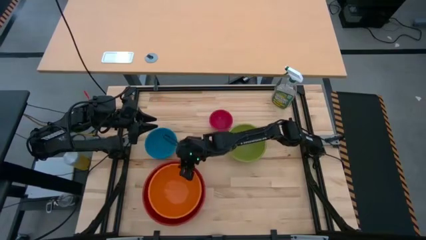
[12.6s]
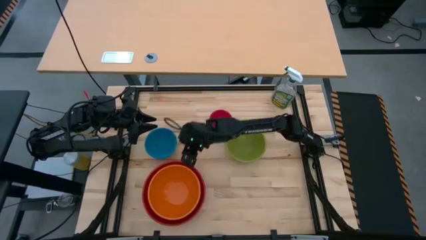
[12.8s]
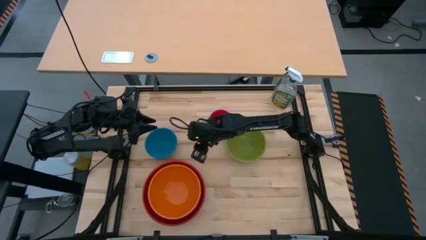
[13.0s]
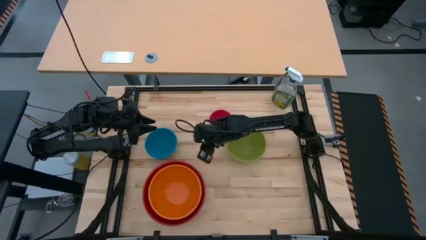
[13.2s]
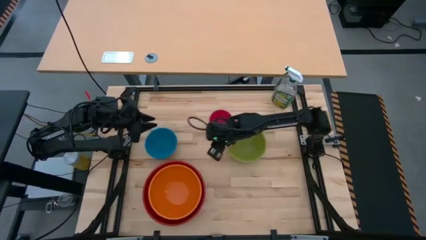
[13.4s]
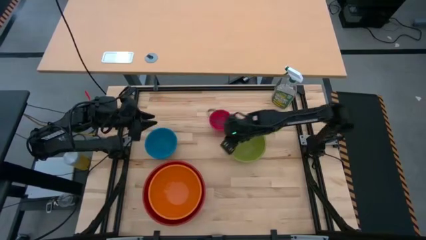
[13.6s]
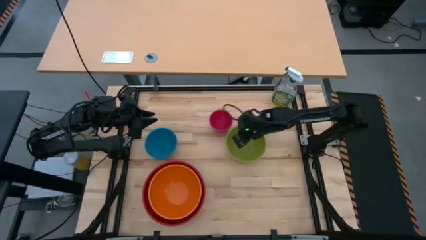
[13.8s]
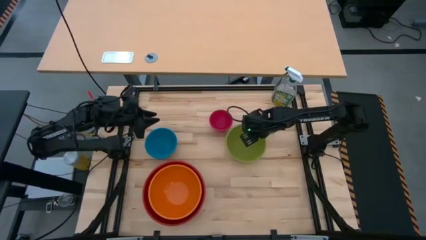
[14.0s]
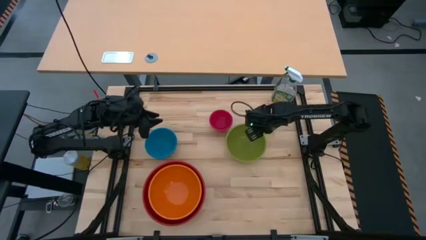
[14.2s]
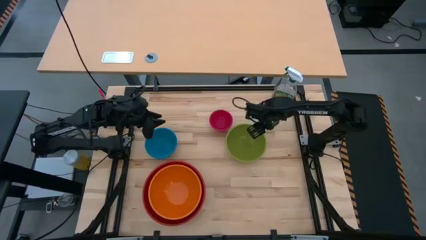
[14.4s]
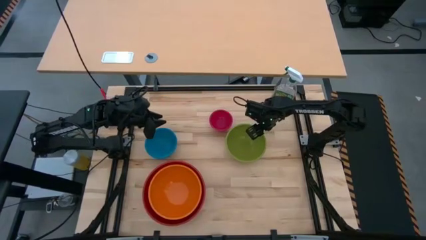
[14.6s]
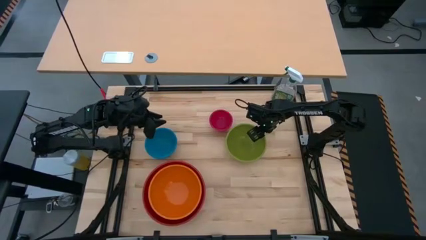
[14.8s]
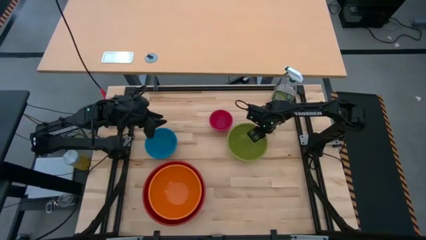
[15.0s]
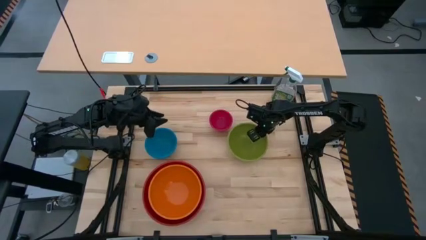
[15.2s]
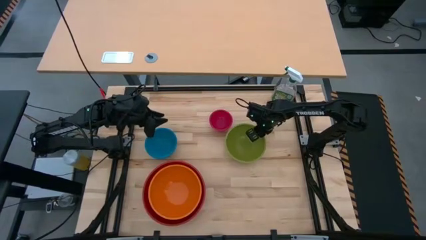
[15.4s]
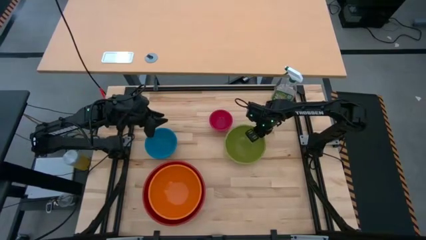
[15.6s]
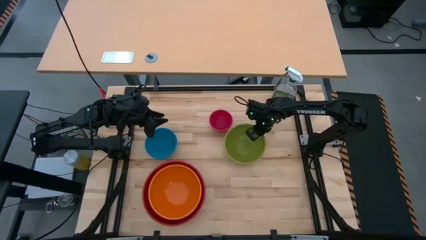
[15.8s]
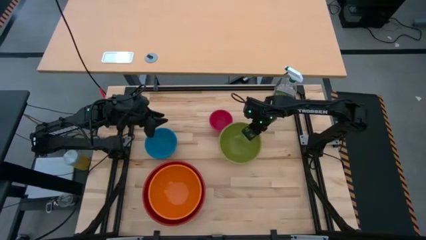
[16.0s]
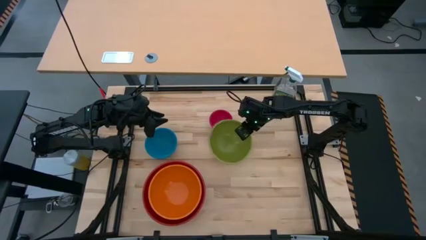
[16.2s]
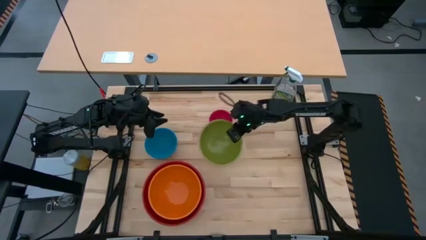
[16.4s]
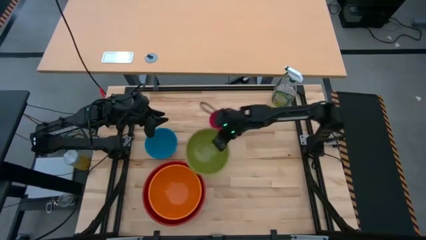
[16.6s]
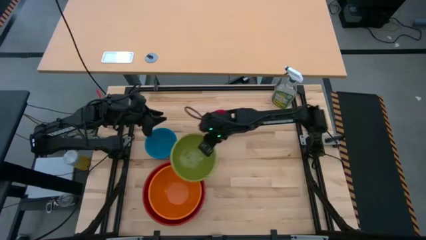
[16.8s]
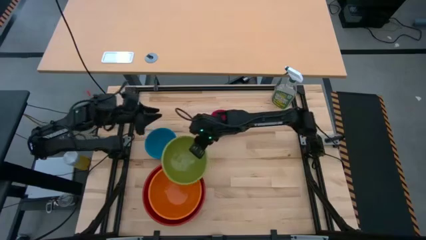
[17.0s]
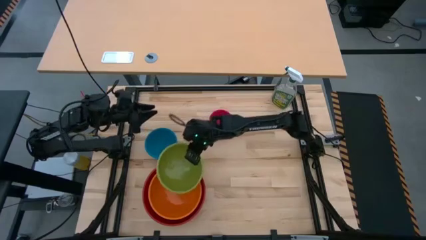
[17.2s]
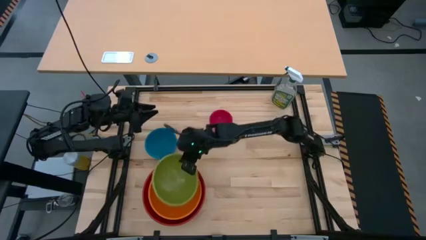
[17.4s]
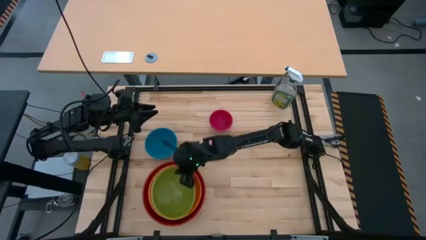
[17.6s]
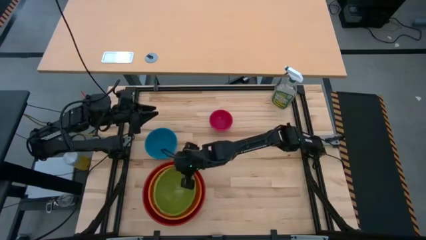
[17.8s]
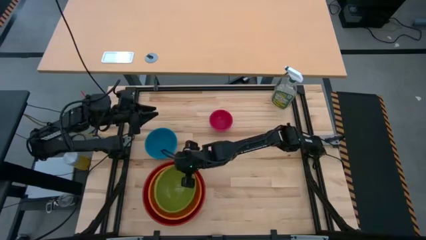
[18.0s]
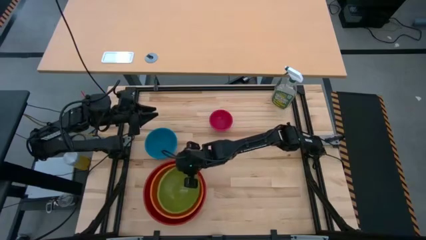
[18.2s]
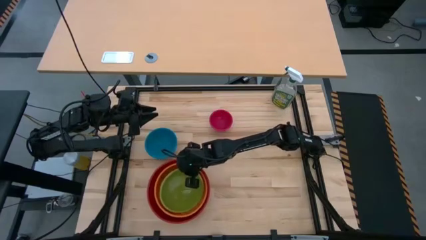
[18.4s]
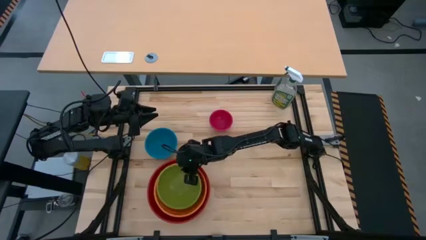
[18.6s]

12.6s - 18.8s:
Stack the green bowl on top of the orange bowl

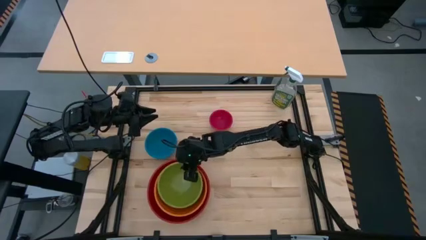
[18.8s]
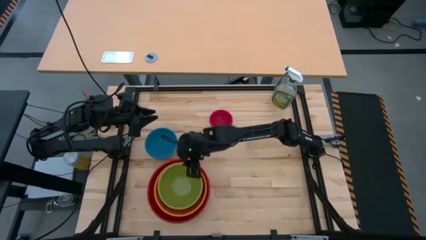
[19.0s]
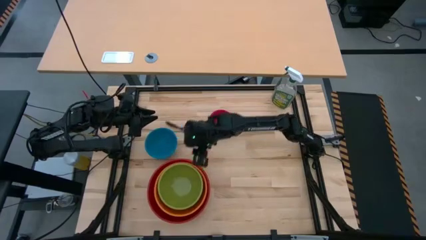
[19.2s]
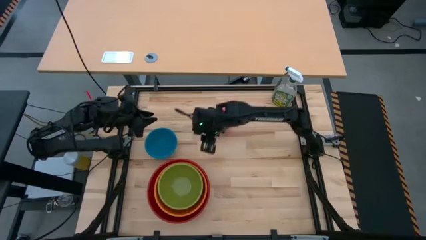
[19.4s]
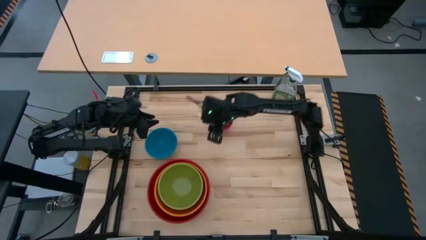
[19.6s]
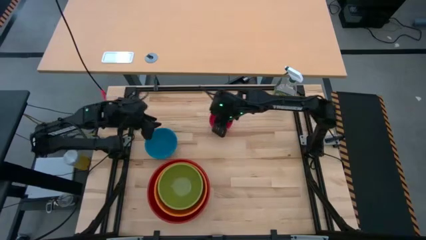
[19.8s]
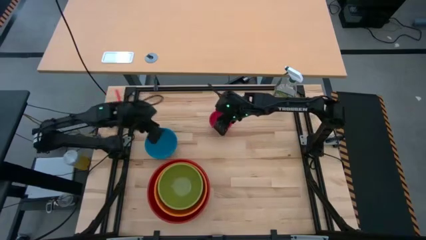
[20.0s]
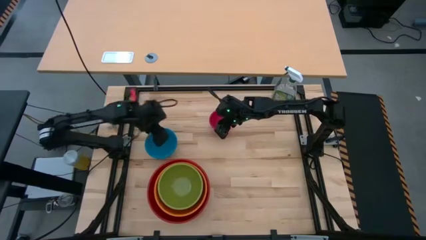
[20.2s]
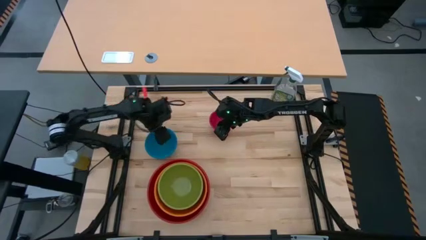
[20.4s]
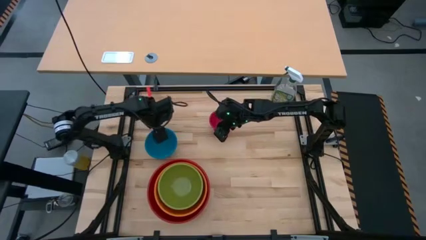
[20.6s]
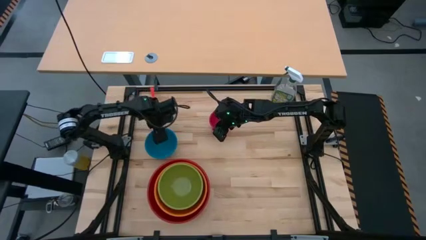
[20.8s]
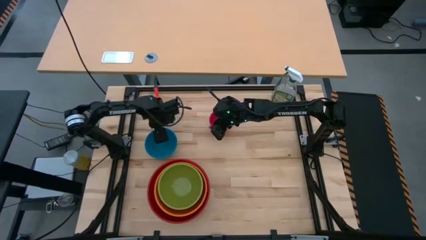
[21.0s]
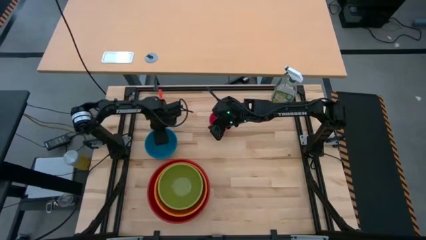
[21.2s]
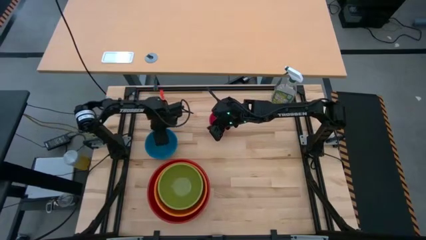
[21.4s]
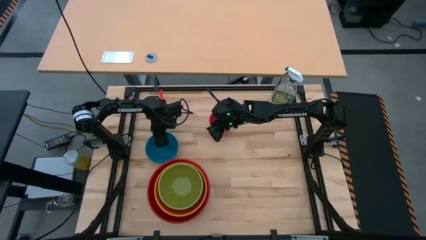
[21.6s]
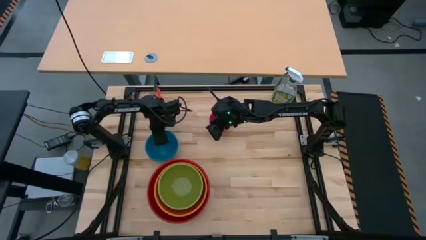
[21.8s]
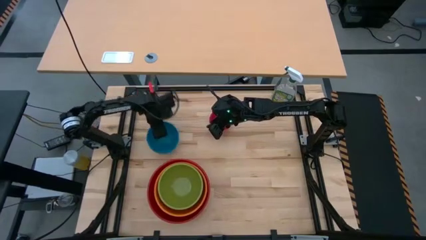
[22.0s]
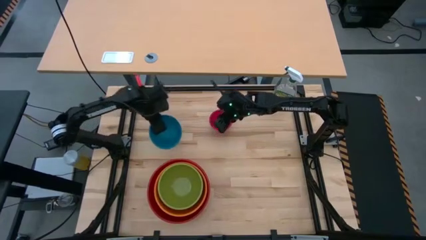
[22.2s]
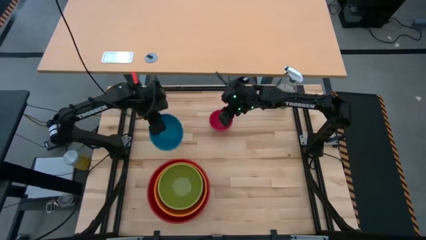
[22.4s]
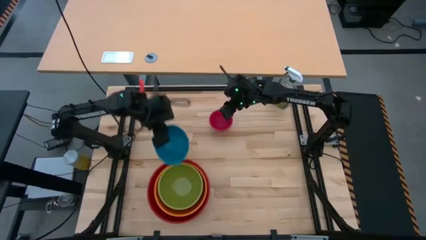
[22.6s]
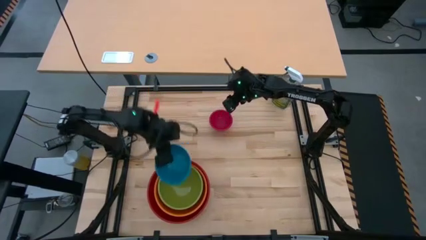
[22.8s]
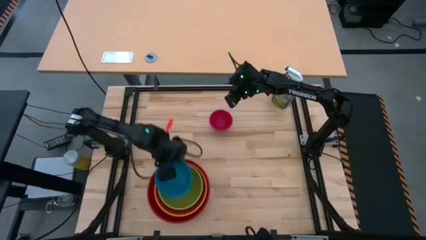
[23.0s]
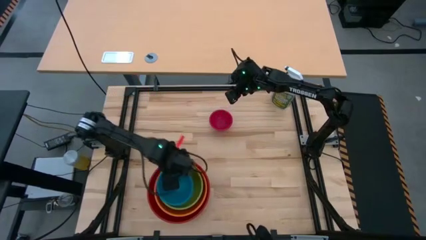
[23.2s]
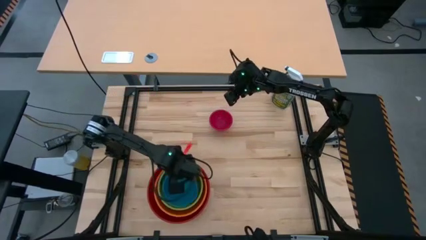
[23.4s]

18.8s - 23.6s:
Stack the blue bowl on top of the green bowl

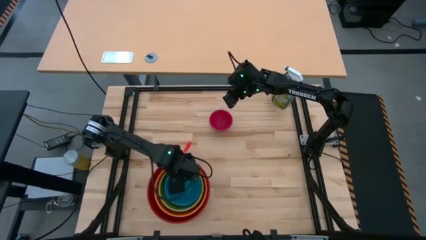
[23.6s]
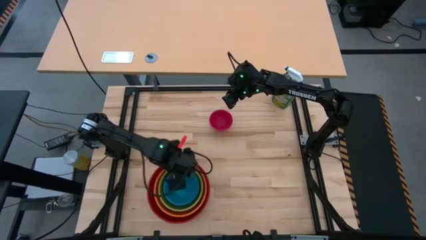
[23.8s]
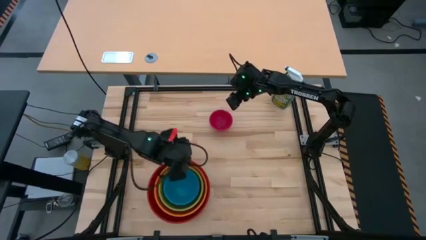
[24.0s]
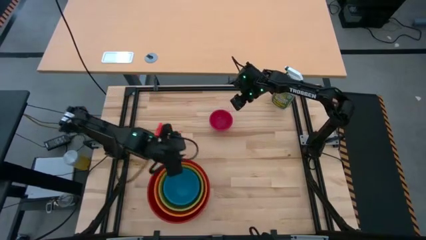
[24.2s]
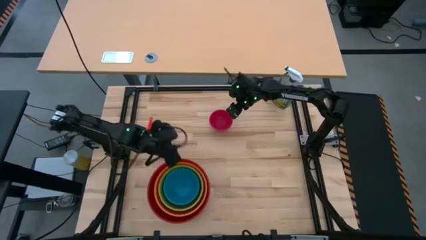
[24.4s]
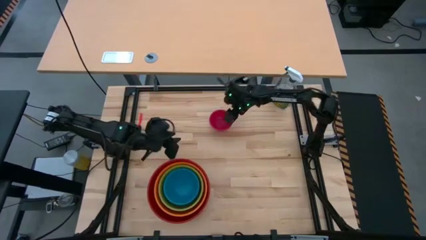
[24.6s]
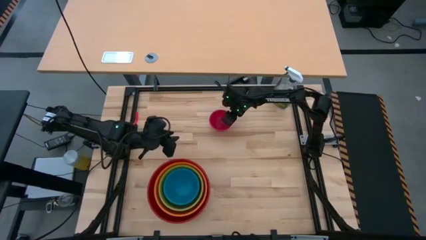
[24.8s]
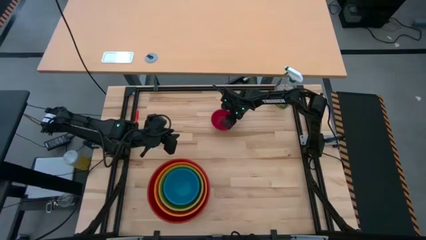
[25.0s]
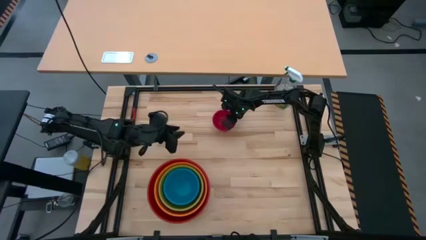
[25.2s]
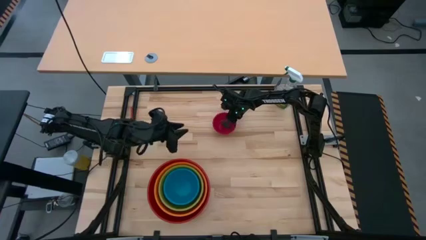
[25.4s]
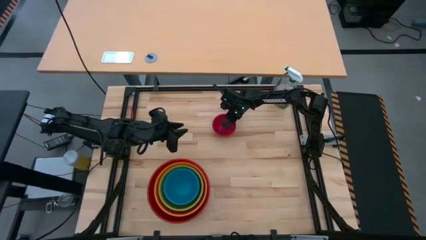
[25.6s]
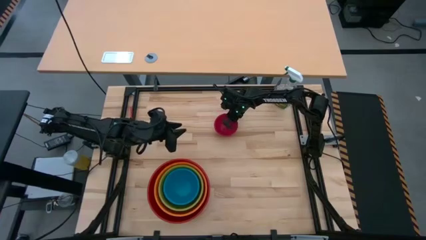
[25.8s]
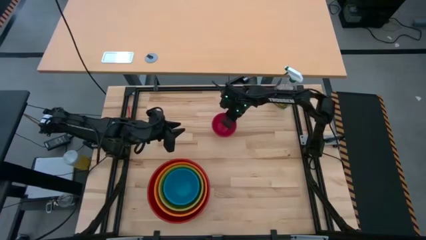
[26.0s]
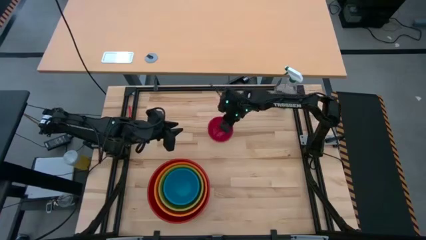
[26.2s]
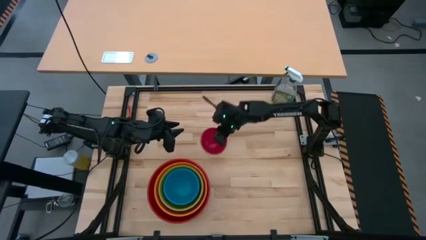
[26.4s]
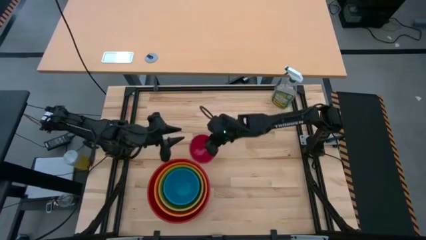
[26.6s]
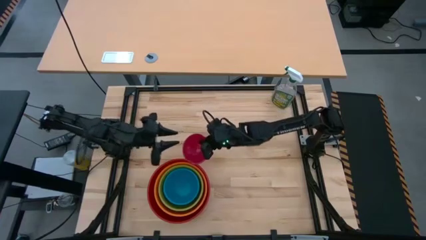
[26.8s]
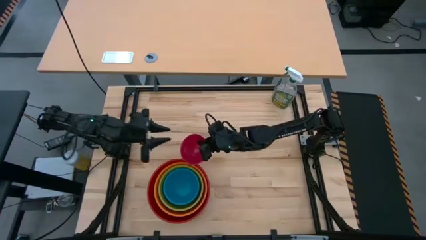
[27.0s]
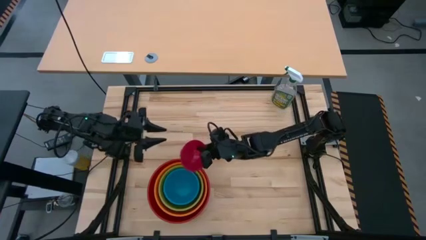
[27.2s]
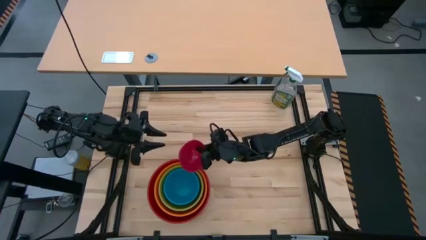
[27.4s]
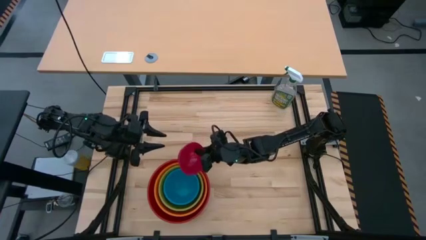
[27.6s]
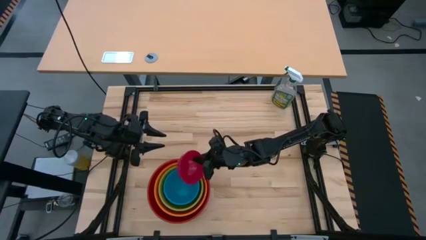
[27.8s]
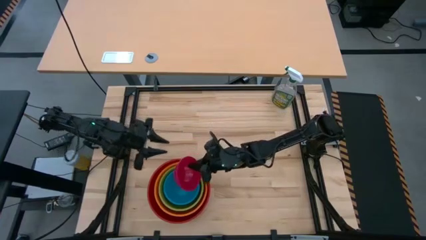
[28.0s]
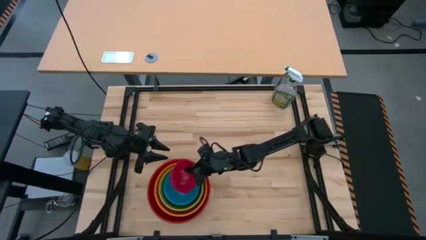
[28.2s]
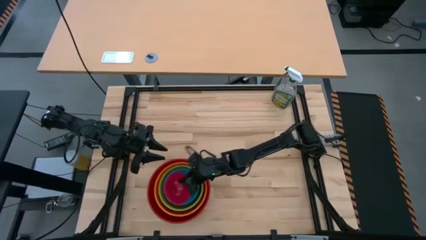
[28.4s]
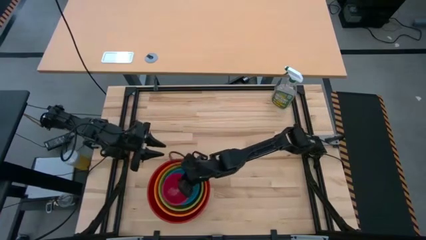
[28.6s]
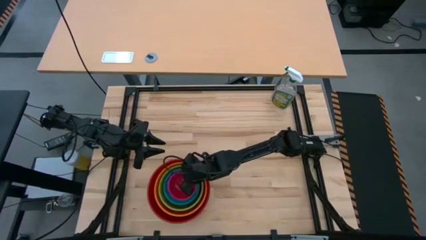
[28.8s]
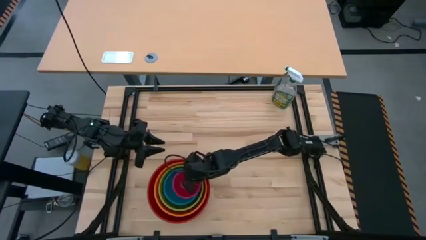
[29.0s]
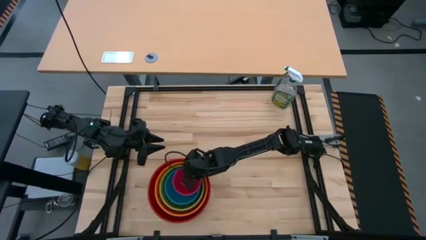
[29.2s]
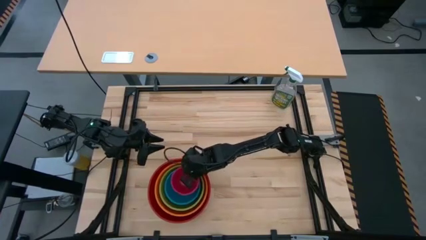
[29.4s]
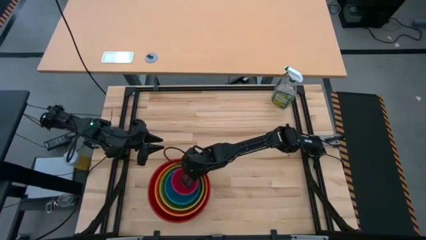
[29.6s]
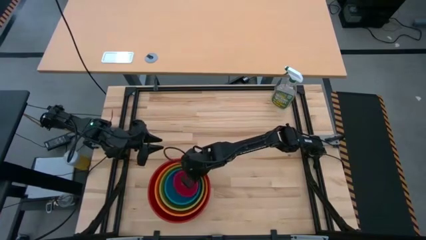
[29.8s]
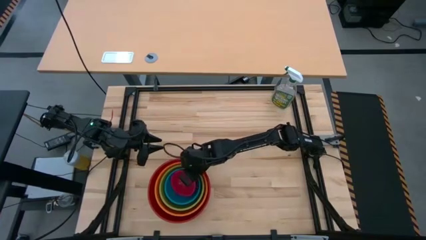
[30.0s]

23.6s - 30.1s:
Stack the pink bowl on top of the blue bowl
